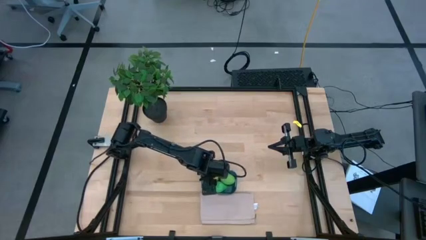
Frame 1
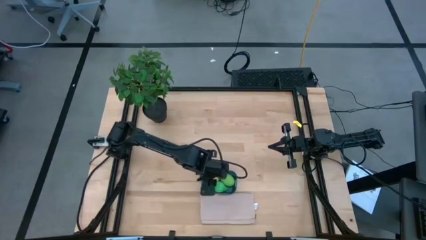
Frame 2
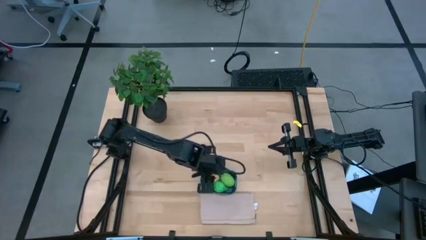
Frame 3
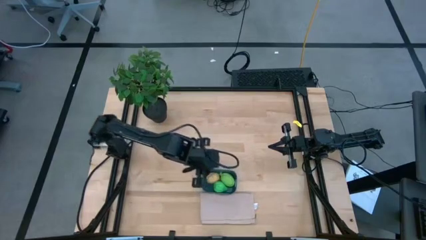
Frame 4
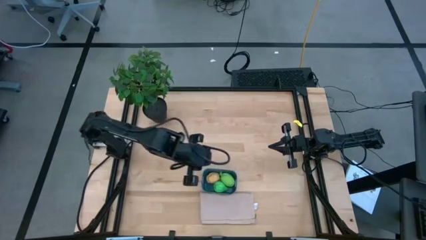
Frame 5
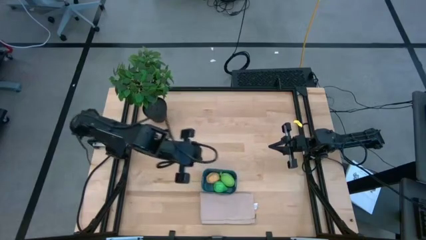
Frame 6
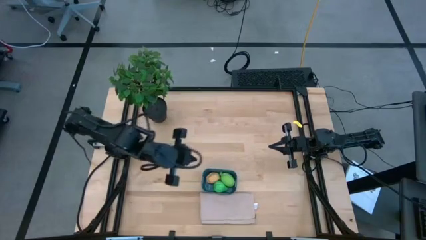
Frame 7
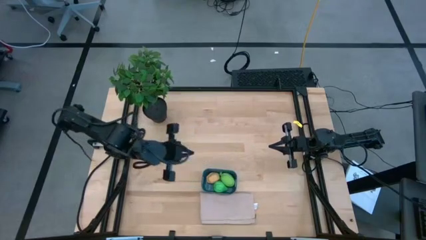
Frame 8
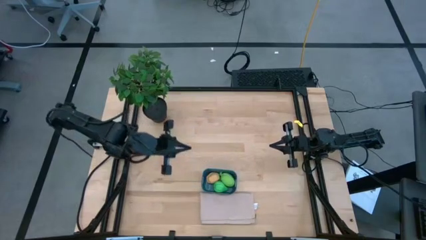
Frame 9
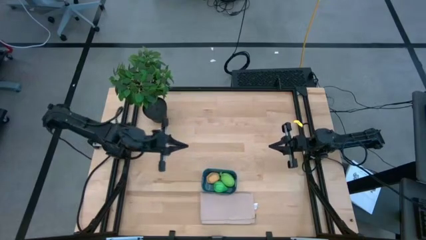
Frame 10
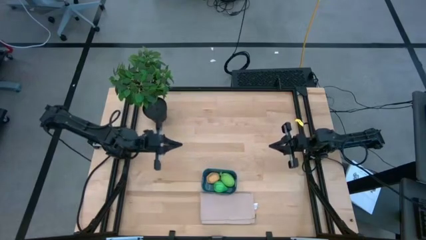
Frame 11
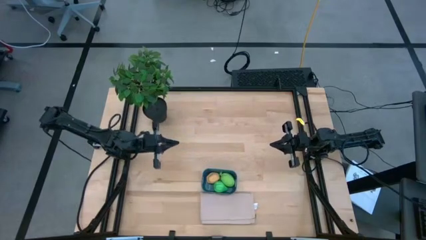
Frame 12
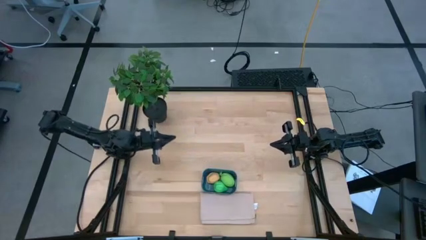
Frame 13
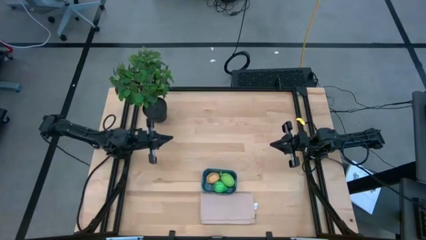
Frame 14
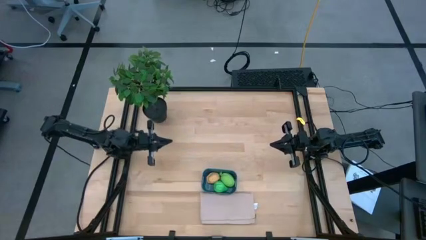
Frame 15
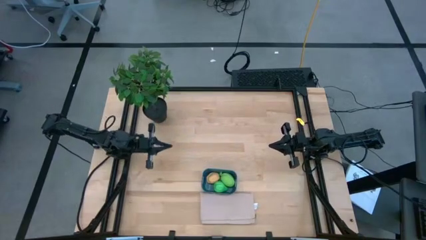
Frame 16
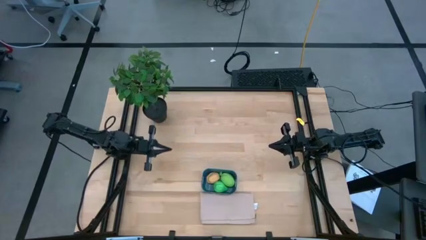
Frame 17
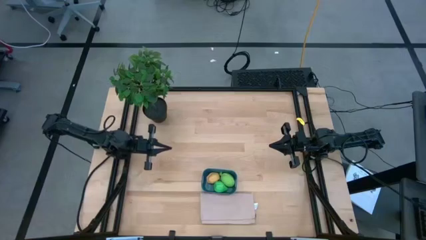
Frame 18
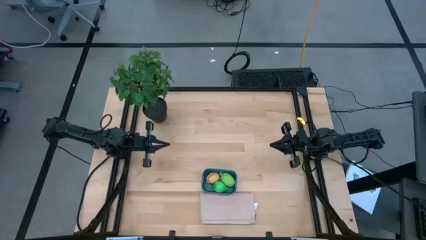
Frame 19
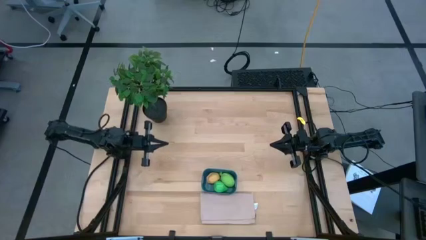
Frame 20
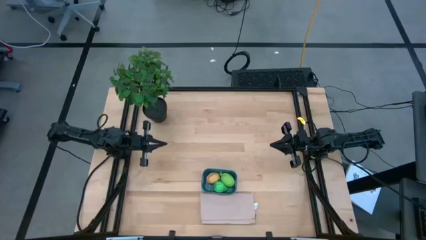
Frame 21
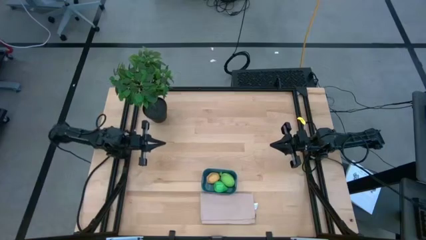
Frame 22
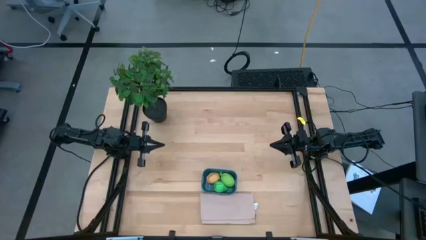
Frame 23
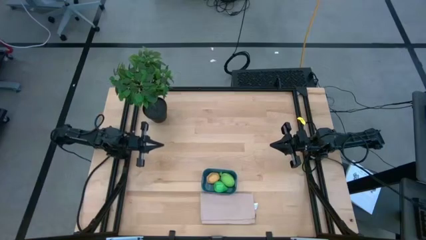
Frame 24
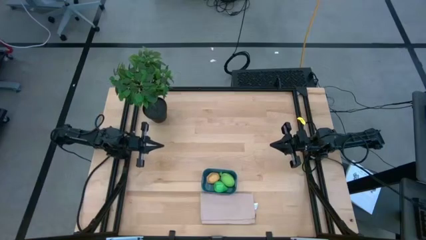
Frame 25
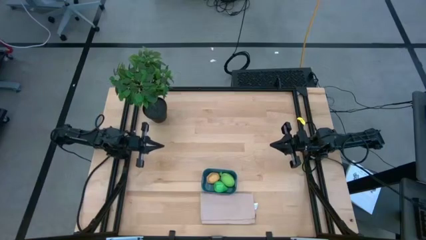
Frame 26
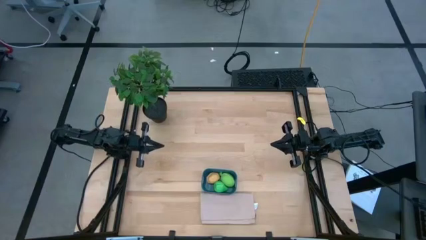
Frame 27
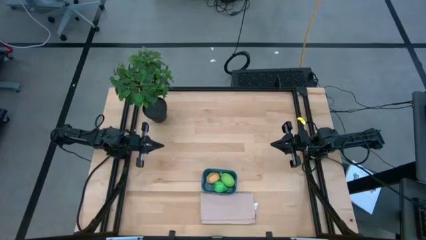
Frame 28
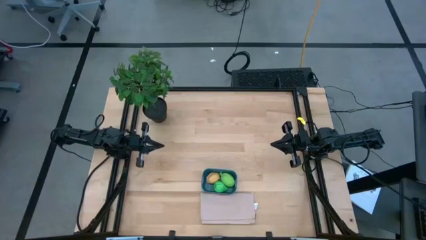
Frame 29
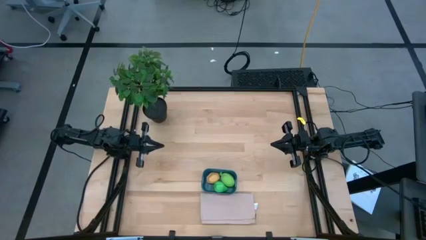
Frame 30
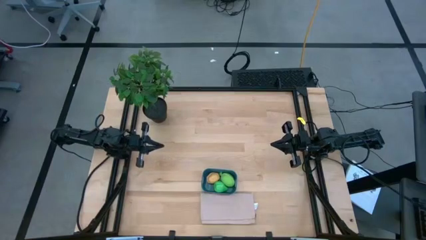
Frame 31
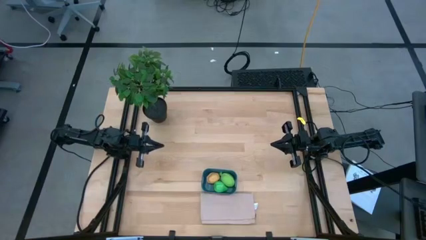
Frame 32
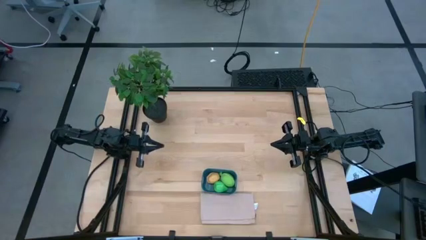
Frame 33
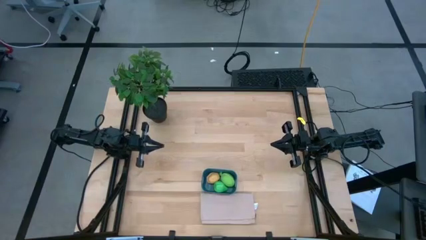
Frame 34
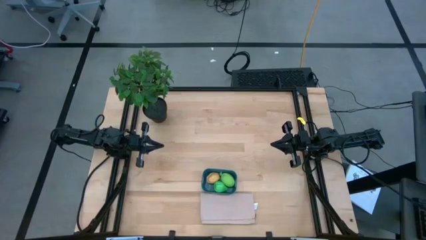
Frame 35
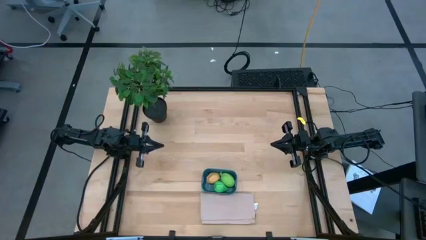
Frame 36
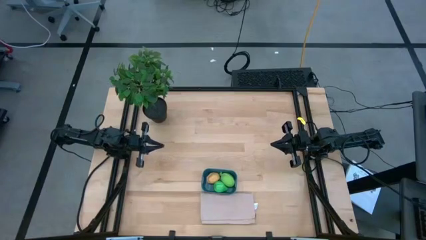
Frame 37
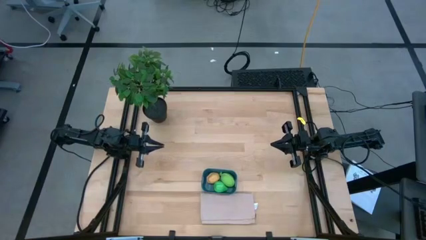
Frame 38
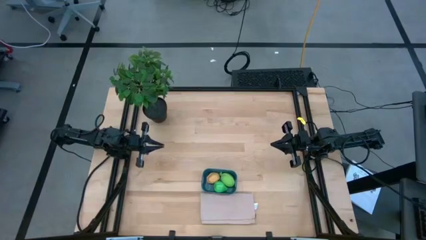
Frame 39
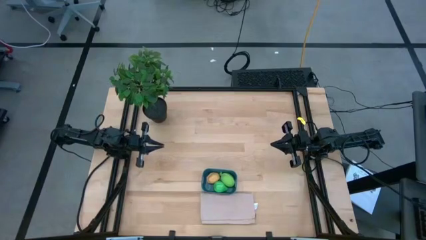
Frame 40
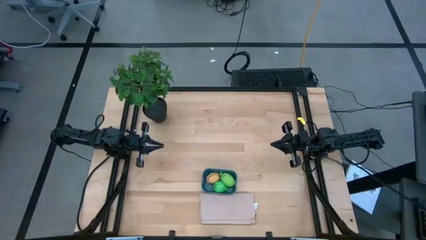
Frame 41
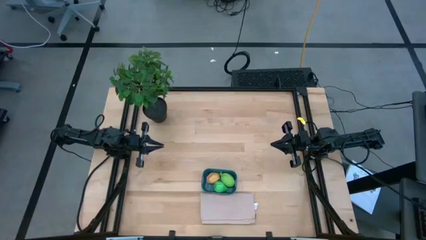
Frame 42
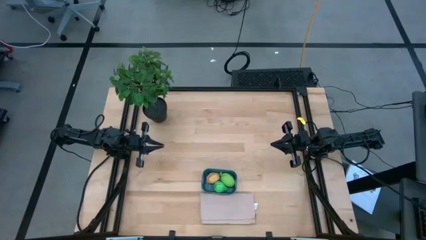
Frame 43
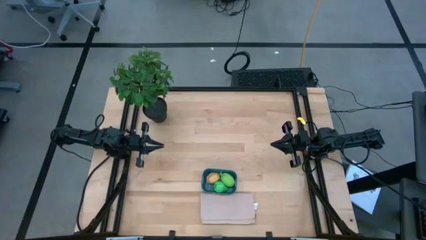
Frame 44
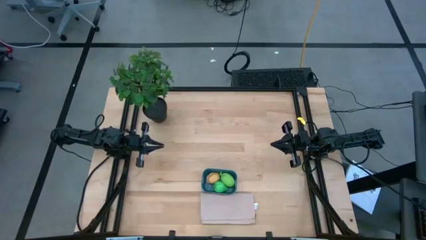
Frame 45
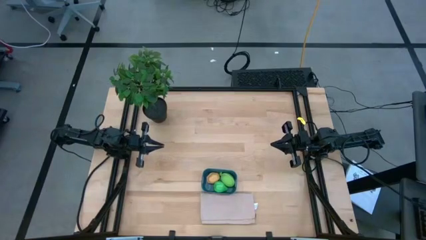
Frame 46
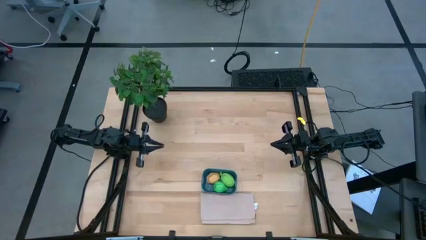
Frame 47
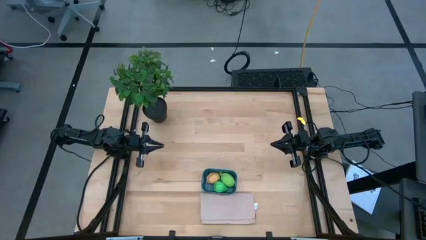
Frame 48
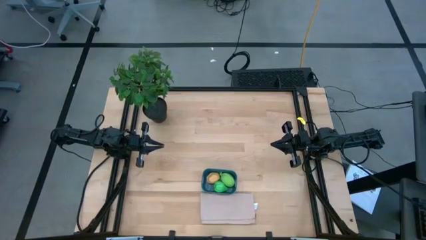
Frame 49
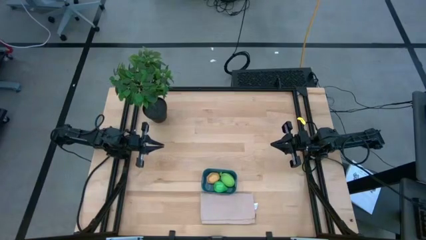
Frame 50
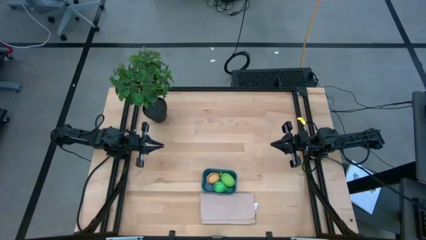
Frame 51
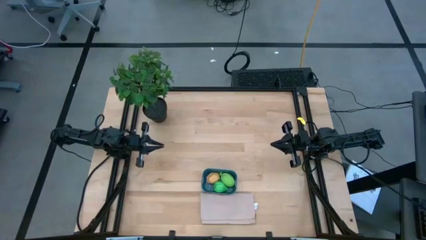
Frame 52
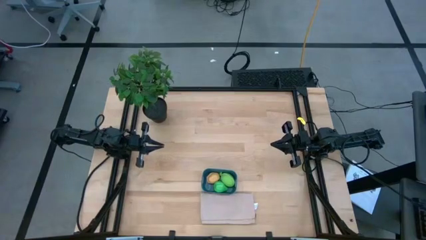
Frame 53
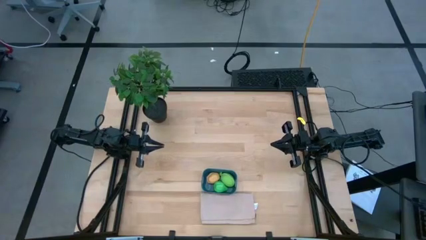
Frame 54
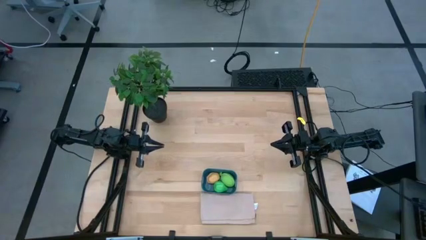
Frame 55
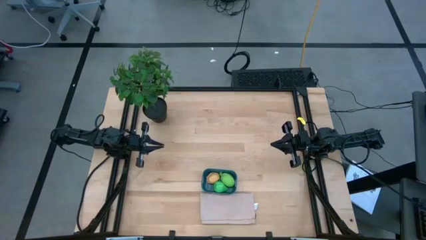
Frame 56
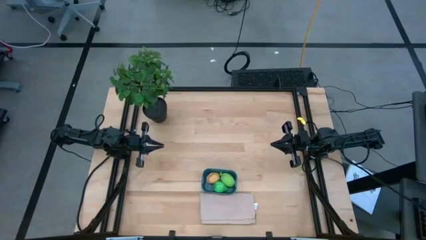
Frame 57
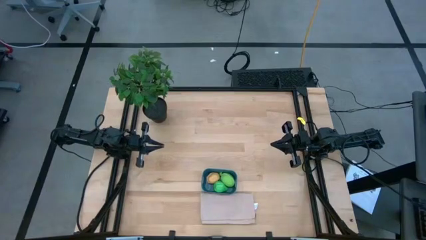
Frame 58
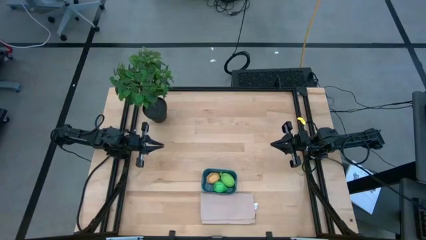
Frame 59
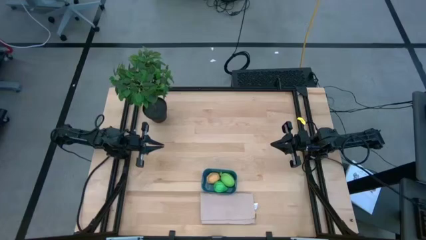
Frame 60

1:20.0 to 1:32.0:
Task: Pick and placing Produce into tupperware
Return to Home Position

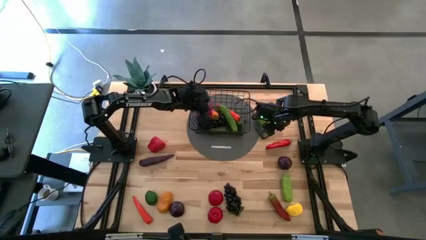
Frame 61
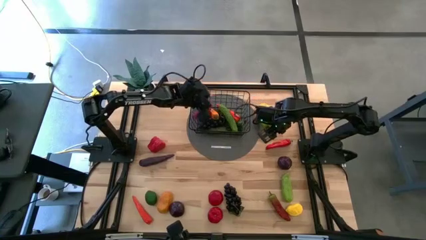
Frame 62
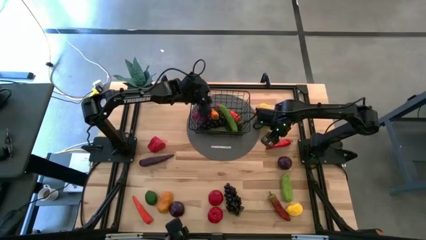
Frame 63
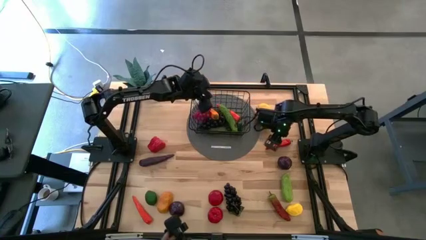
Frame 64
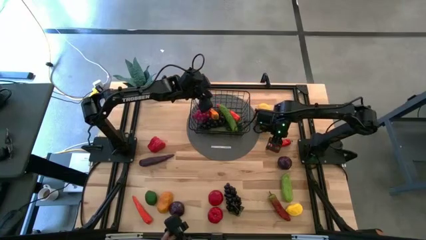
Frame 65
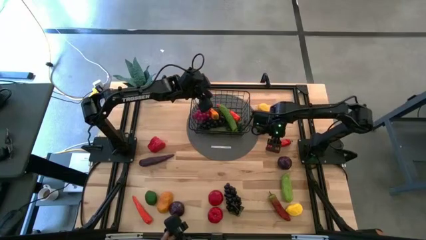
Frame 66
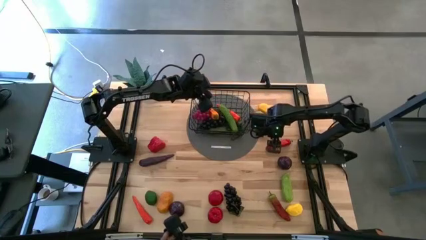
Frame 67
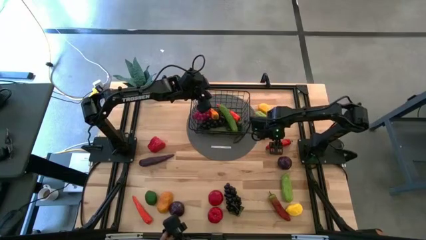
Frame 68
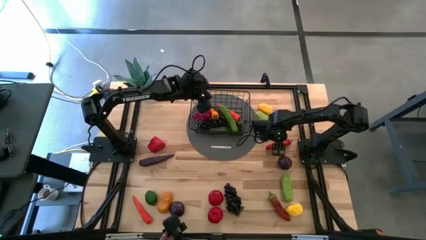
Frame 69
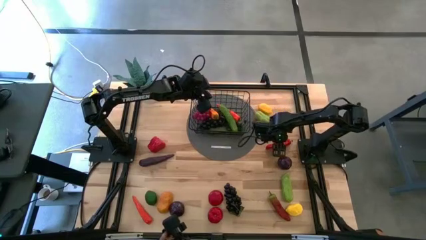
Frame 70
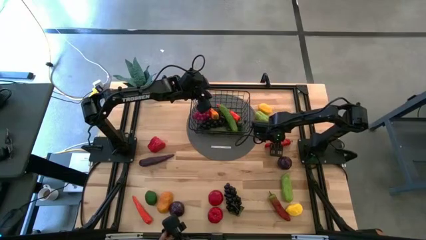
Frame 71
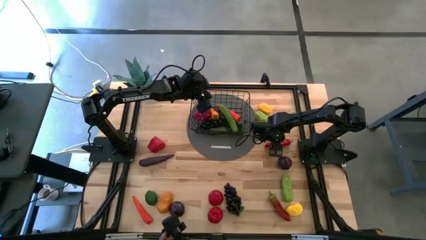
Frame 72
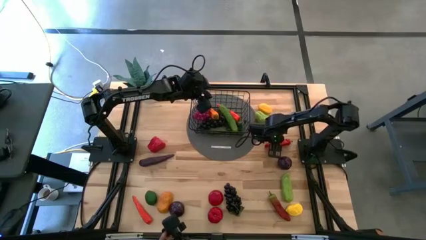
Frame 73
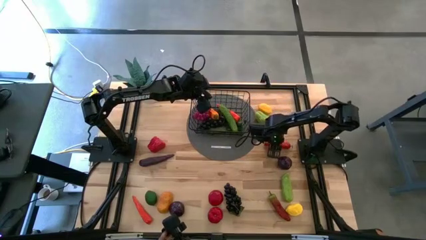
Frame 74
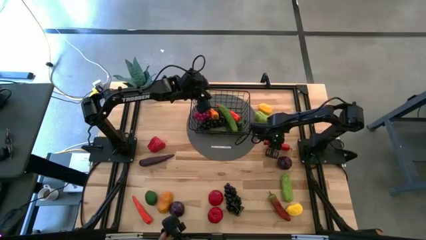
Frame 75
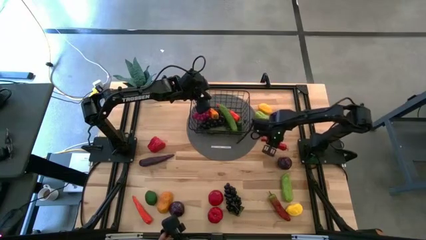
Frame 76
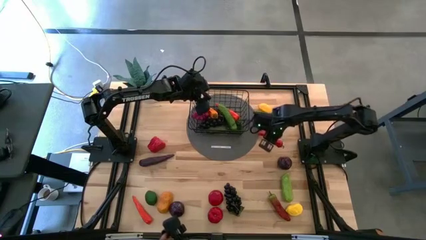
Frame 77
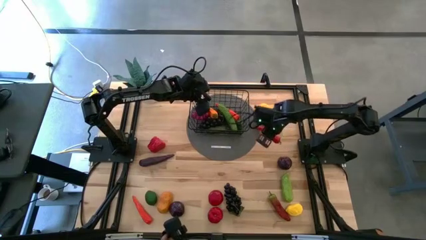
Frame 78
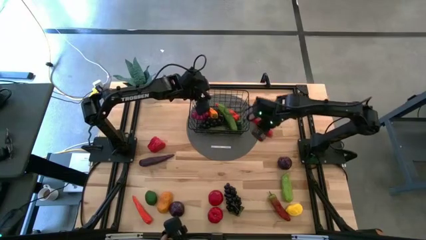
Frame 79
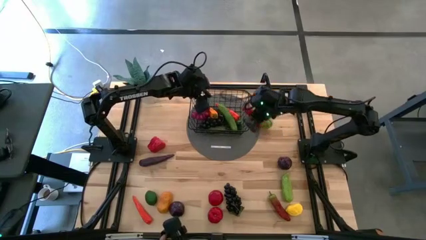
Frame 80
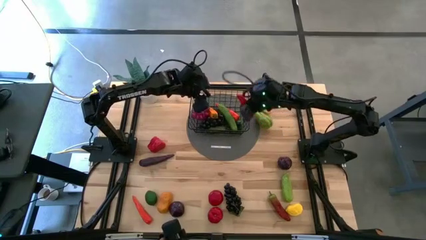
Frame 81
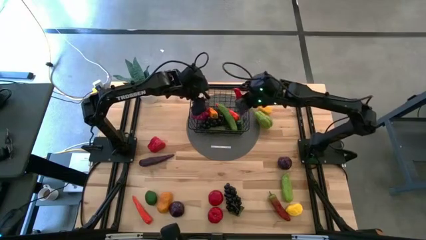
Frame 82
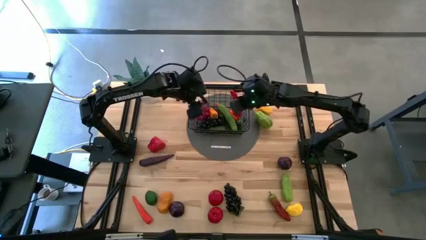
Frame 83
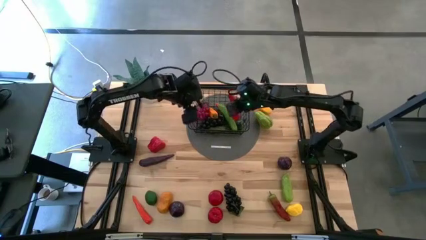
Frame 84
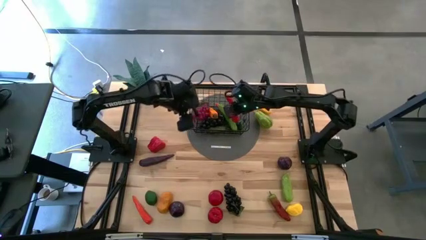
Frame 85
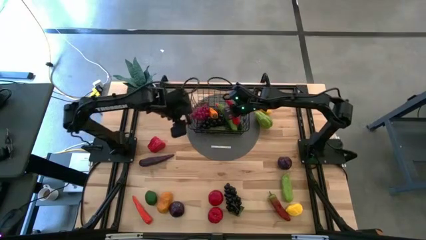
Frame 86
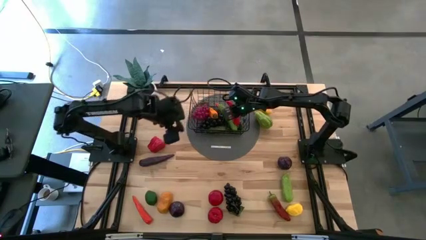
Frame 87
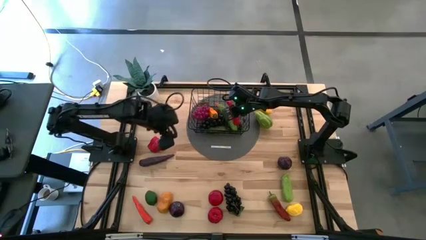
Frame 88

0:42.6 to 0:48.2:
Task: Build produce basket
Put the top red chili pepper into the wire basket
